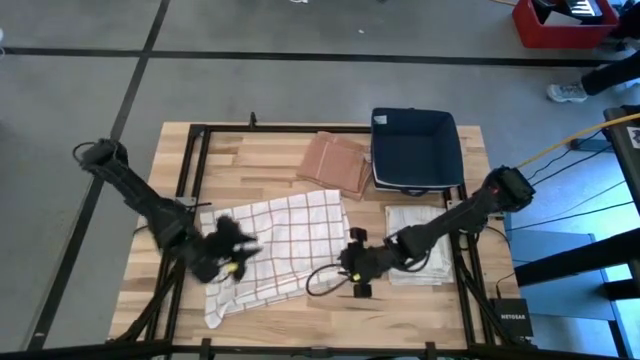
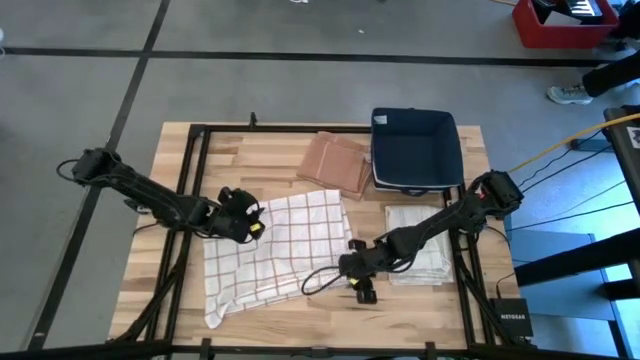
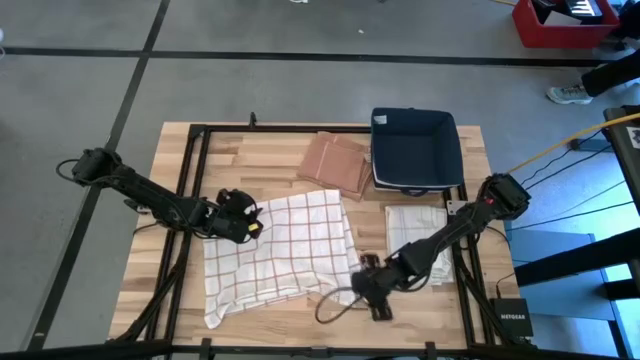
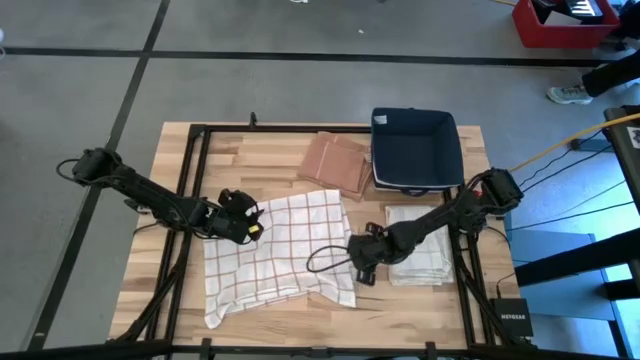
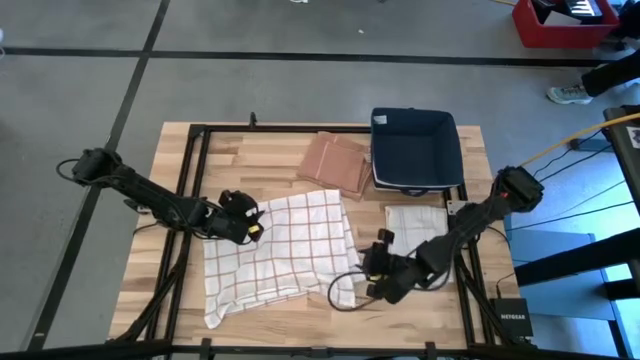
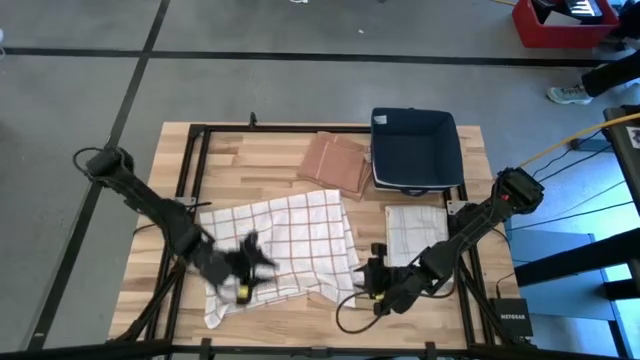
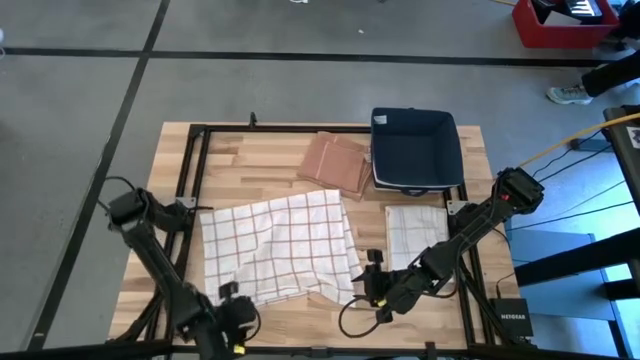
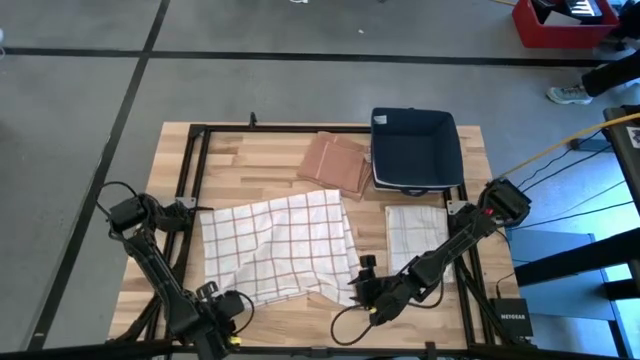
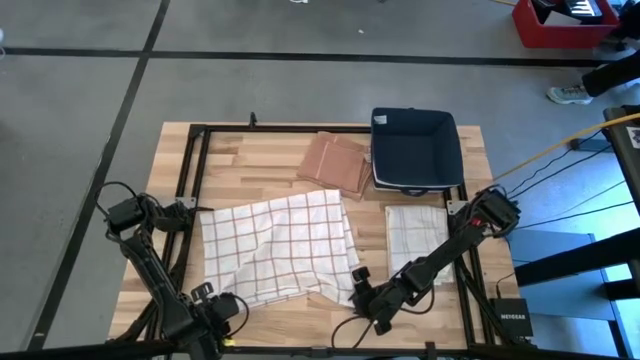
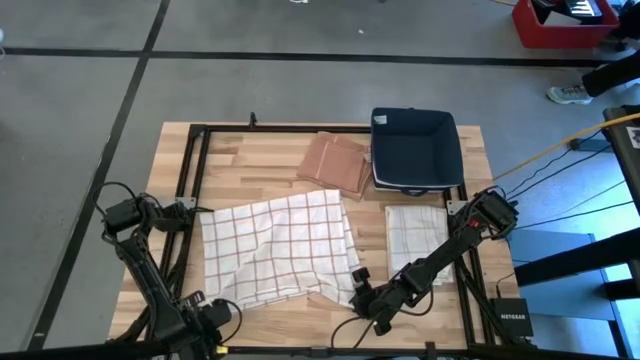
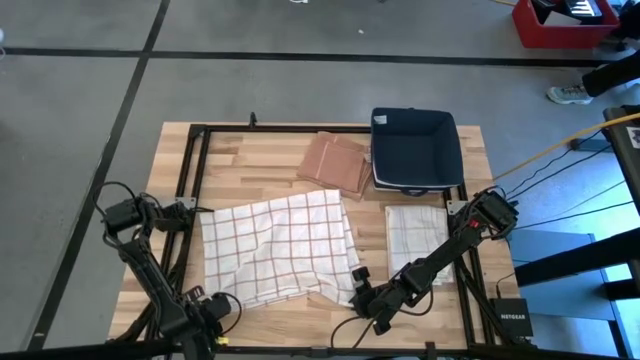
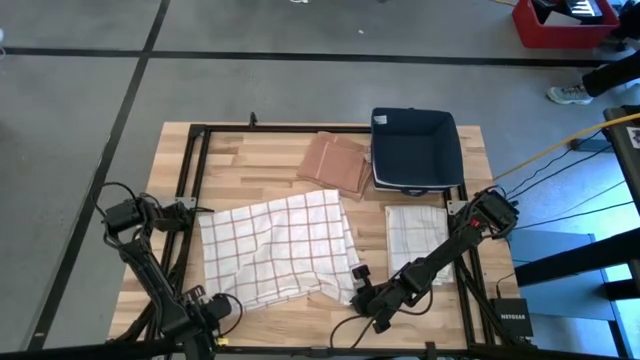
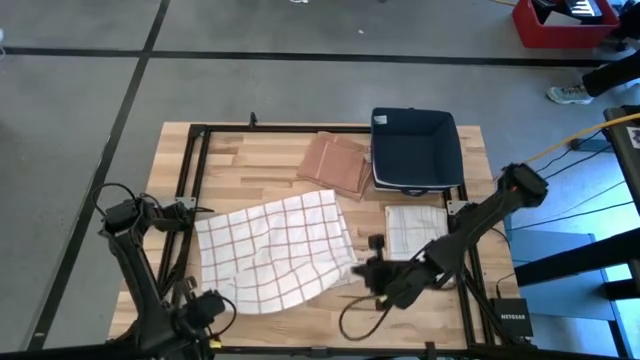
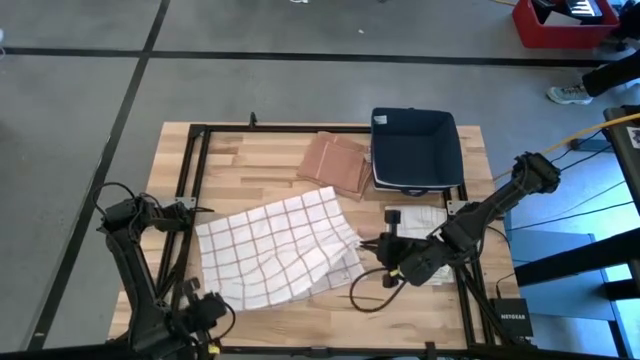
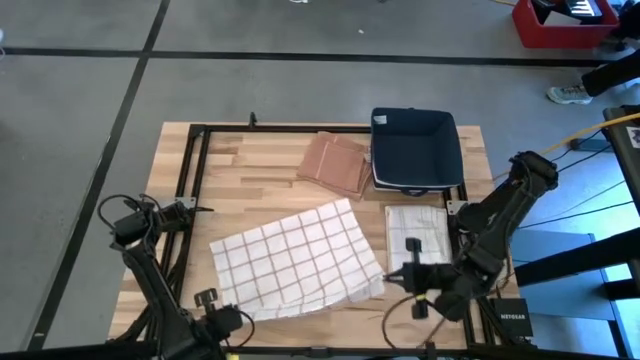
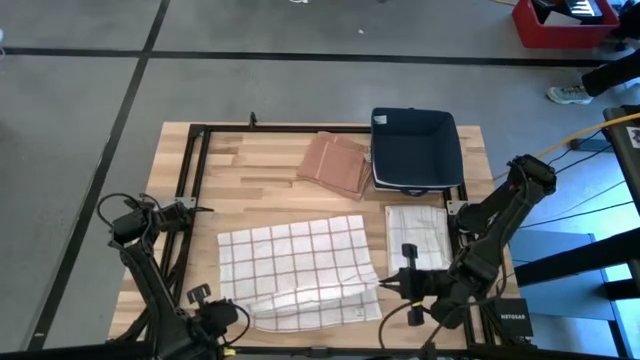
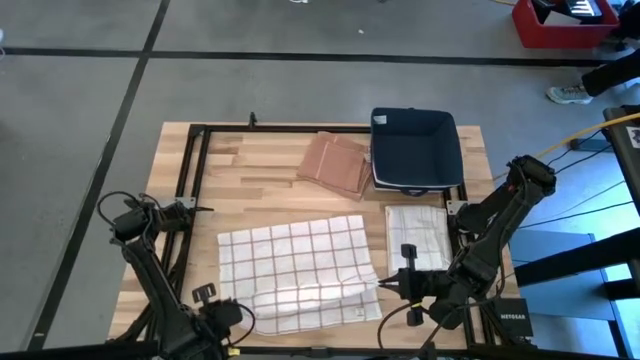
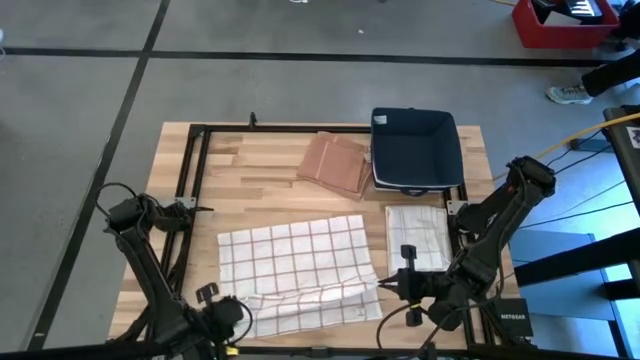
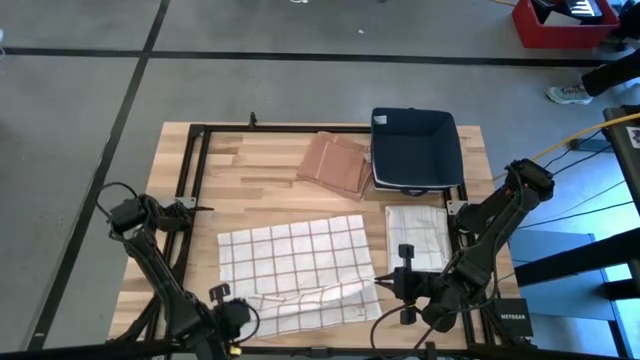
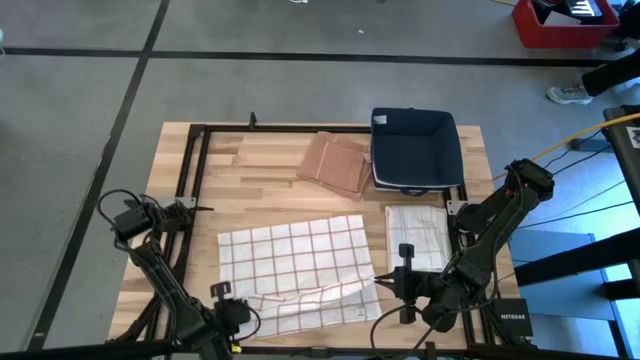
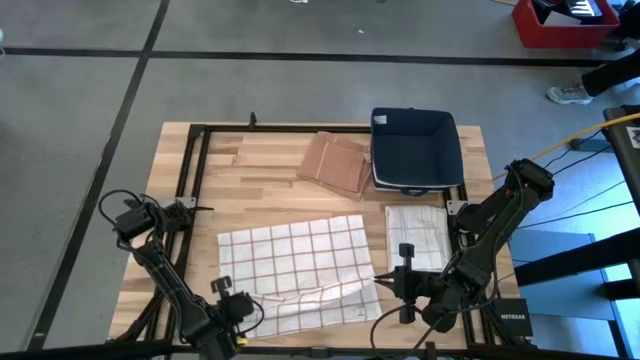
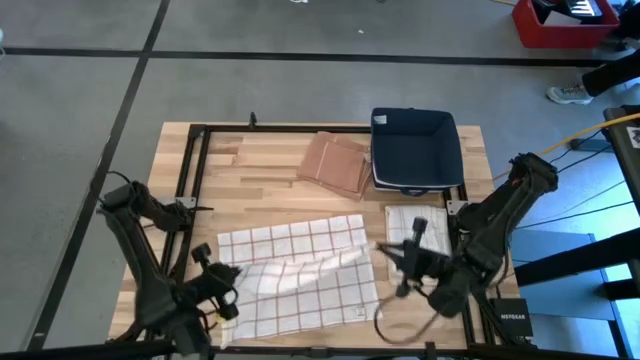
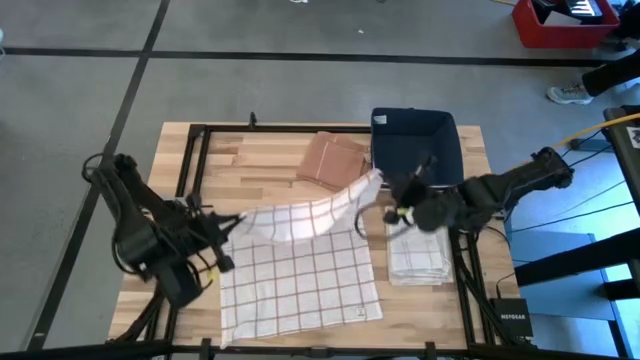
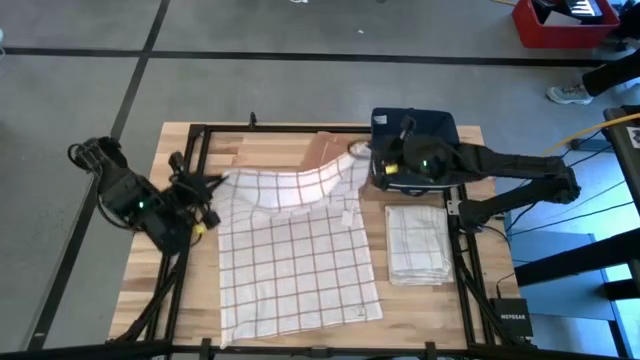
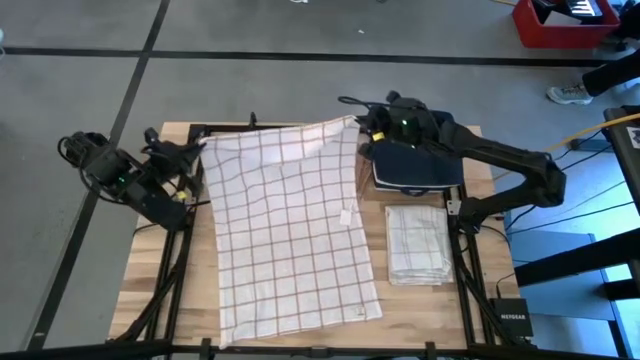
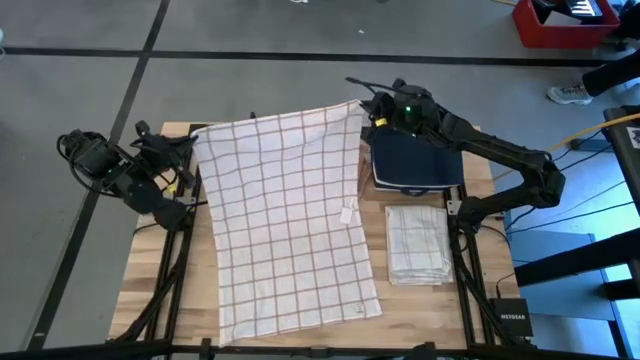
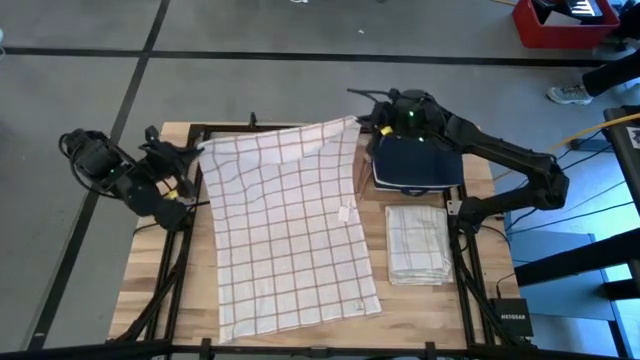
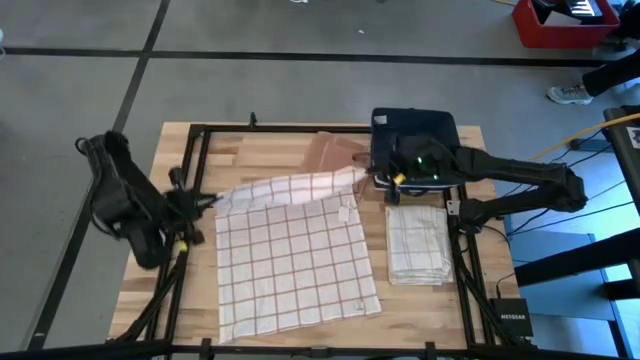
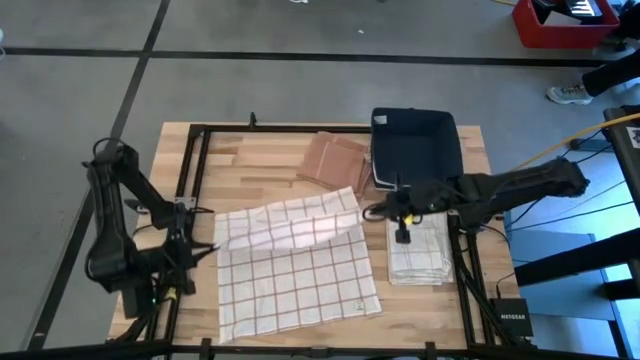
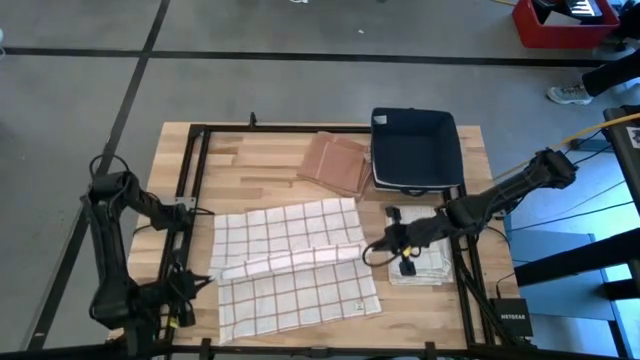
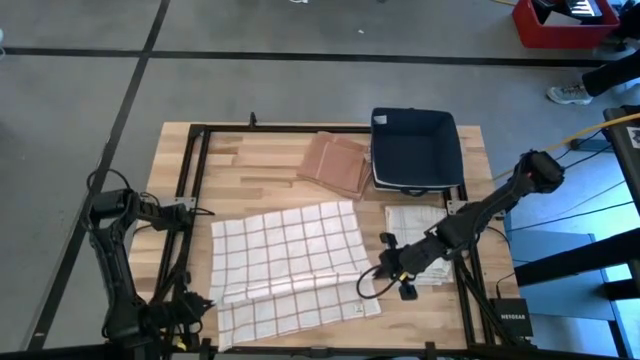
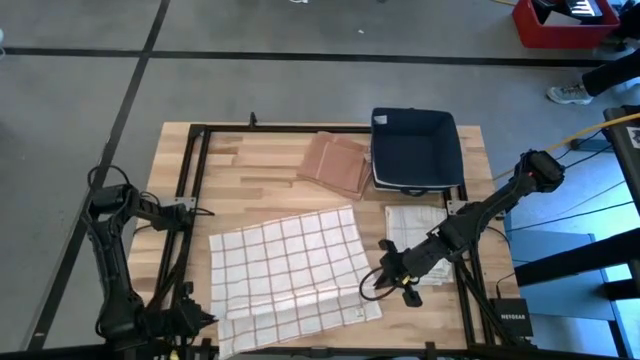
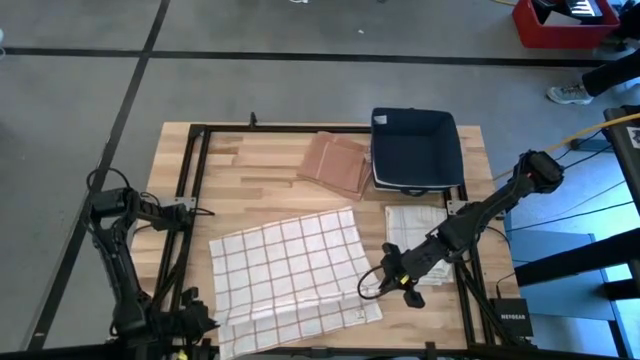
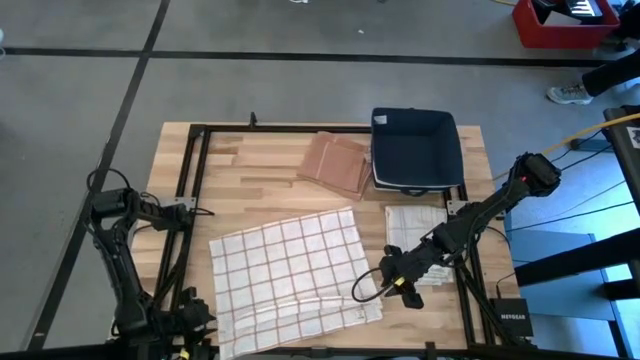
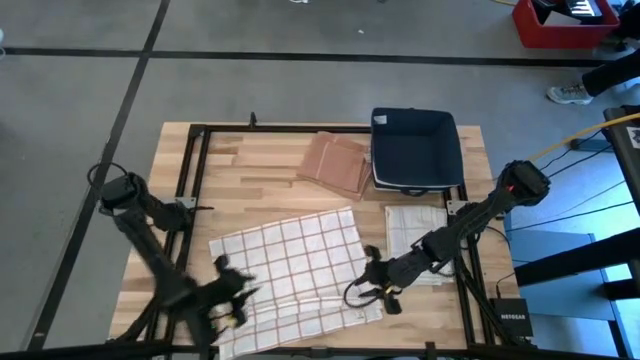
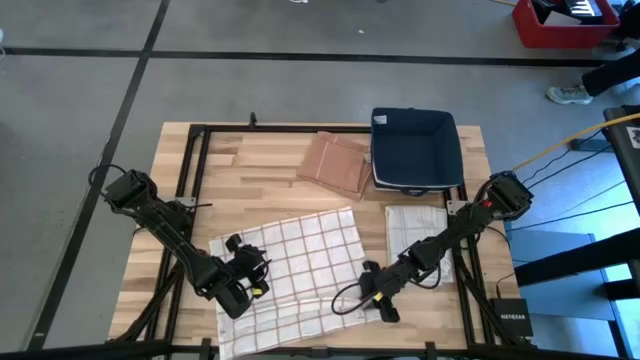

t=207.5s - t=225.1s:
Task: Fold towel
Fold the white towel

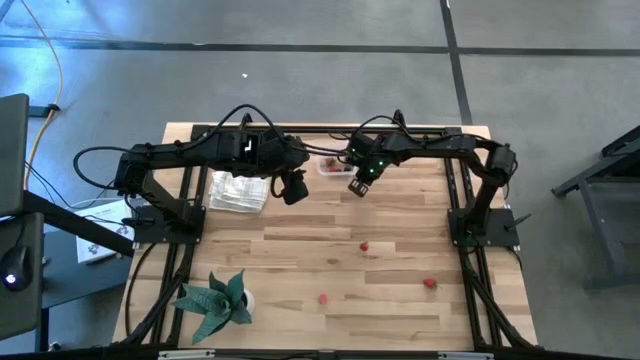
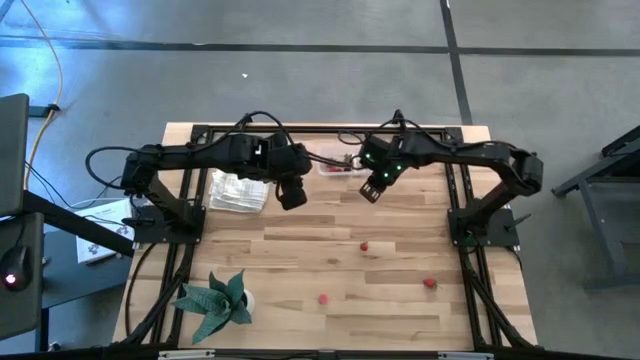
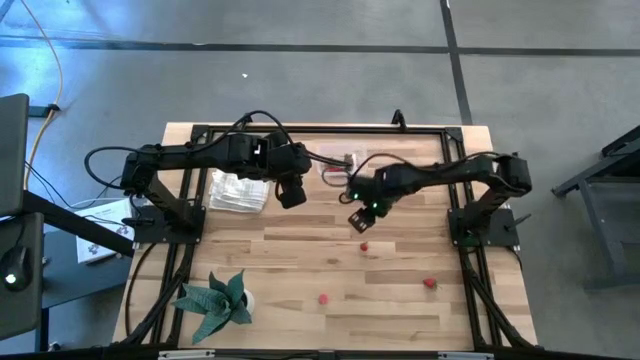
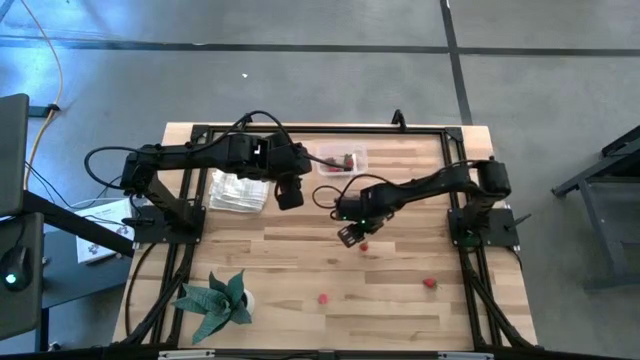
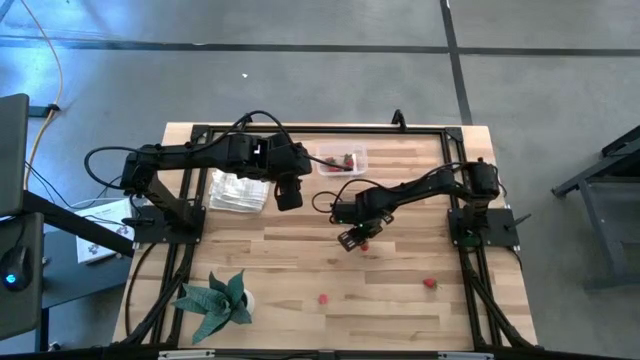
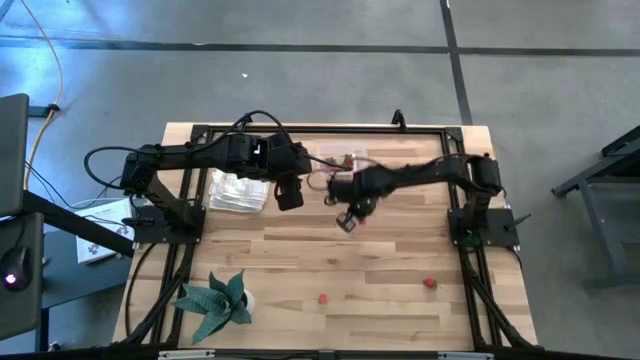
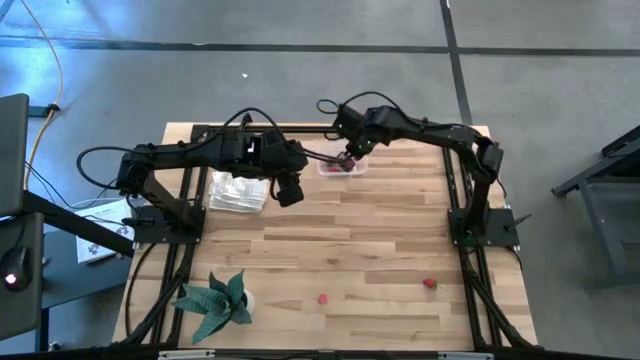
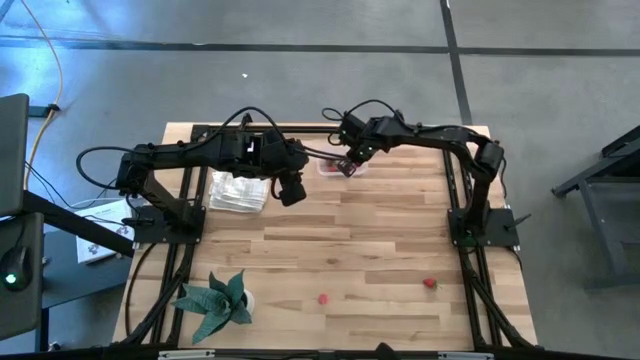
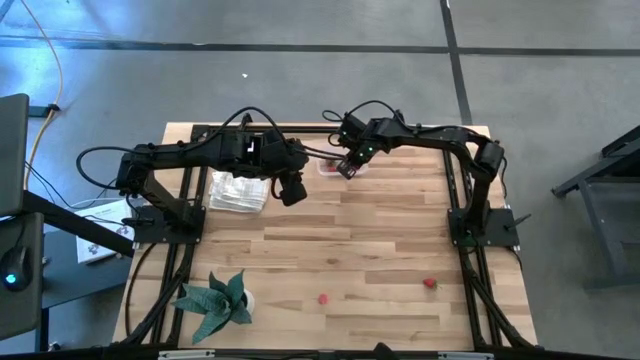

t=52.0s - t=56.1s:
Task: Pick and placing Produce into tupperware
Put the top red strawberry into the transparent container
